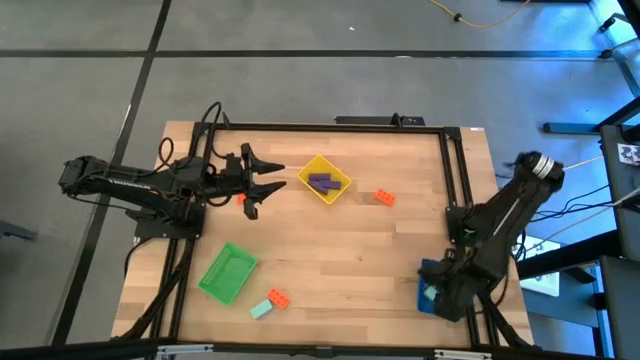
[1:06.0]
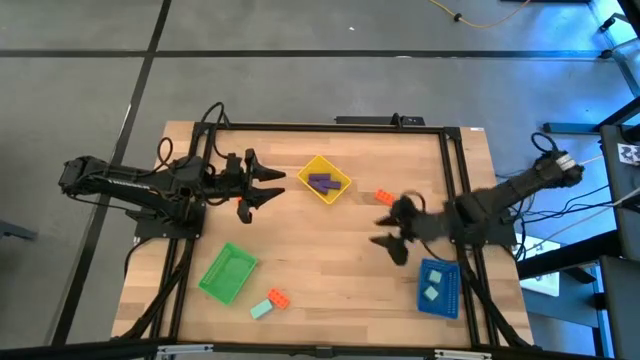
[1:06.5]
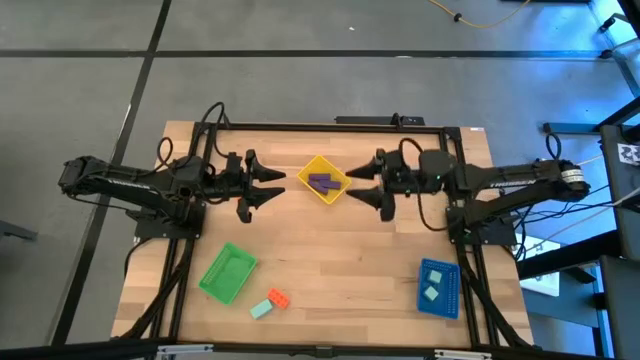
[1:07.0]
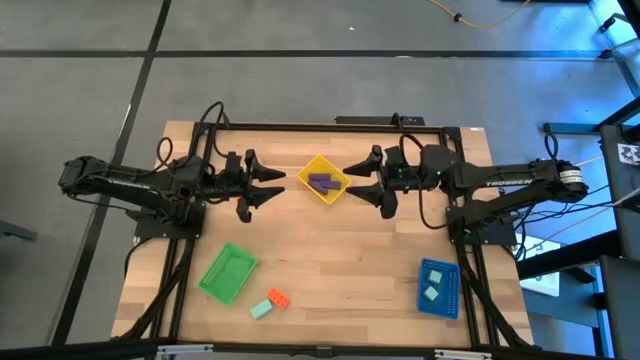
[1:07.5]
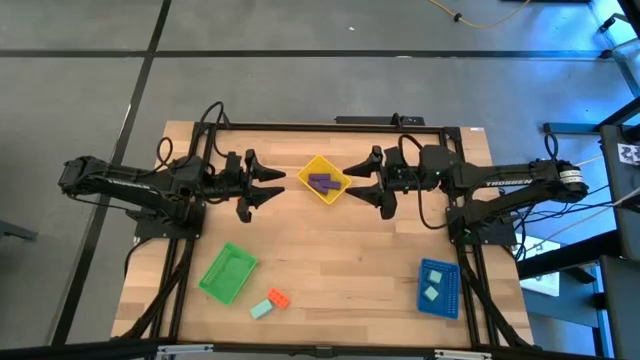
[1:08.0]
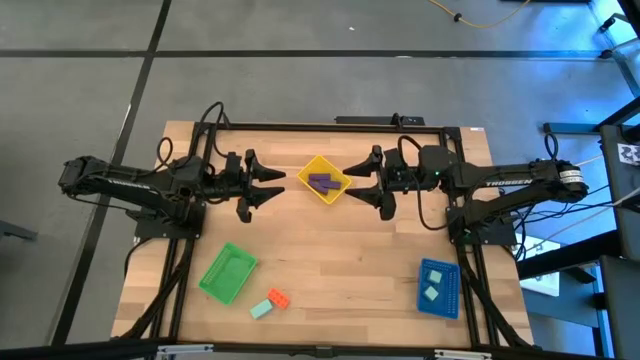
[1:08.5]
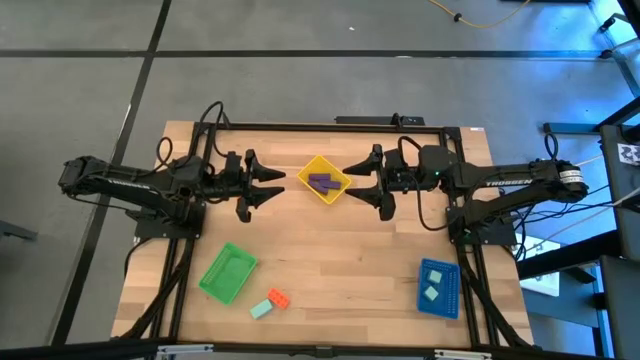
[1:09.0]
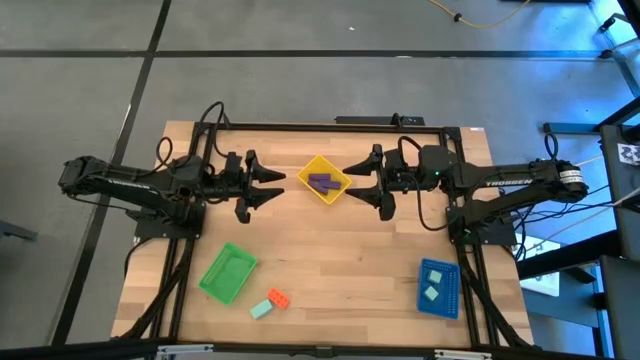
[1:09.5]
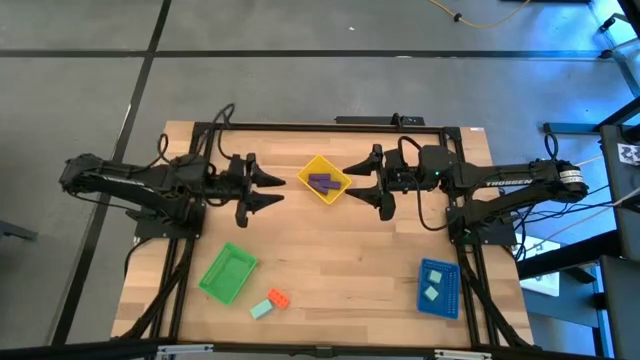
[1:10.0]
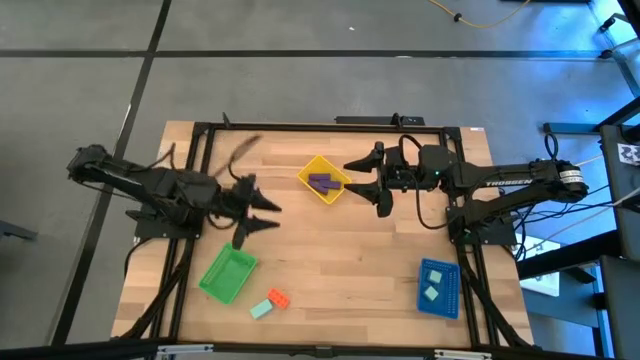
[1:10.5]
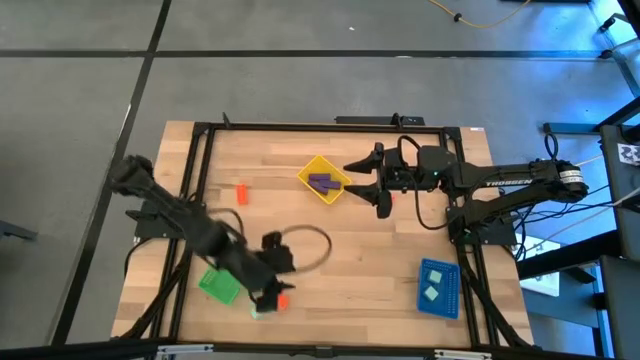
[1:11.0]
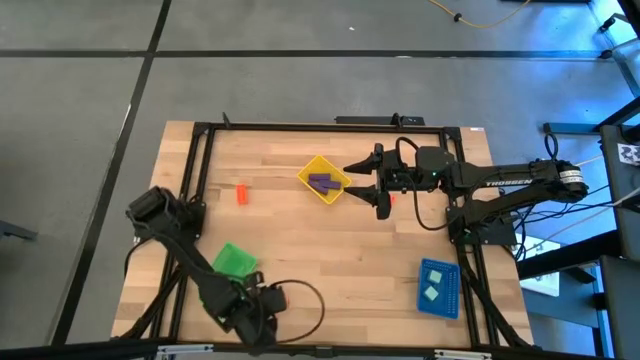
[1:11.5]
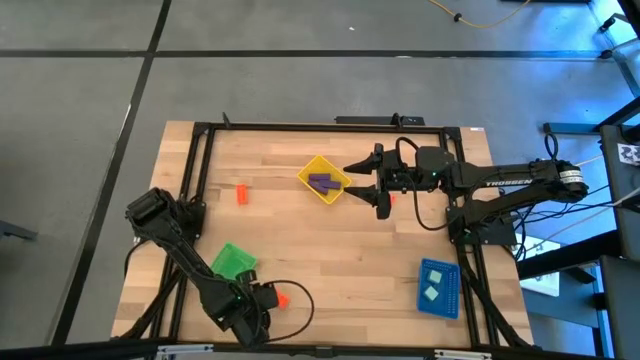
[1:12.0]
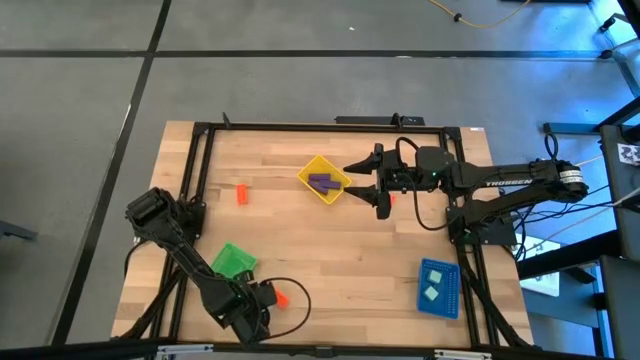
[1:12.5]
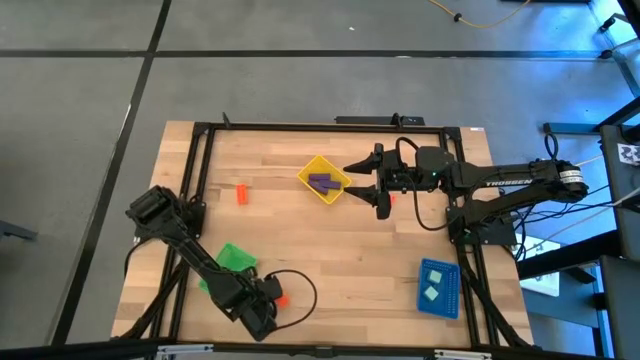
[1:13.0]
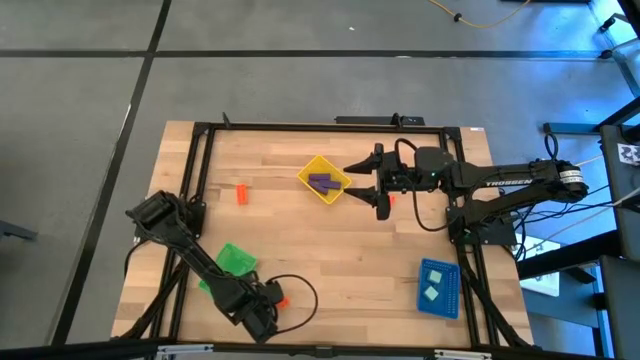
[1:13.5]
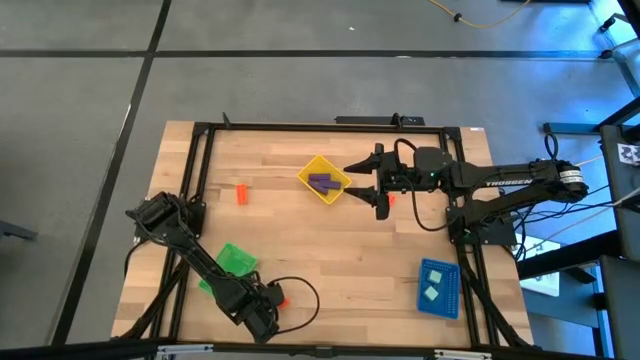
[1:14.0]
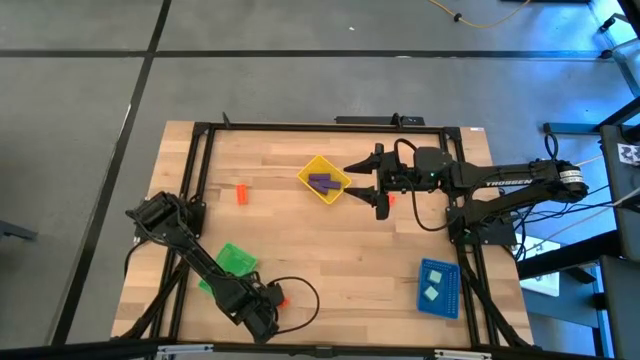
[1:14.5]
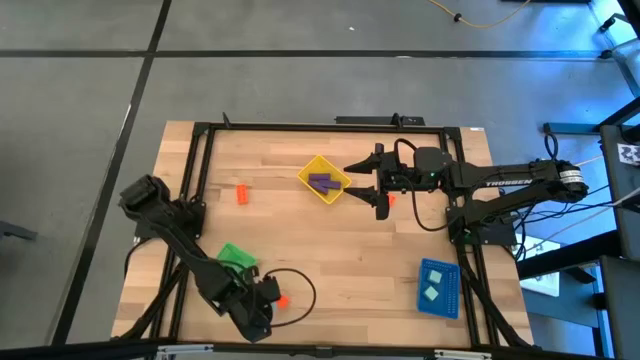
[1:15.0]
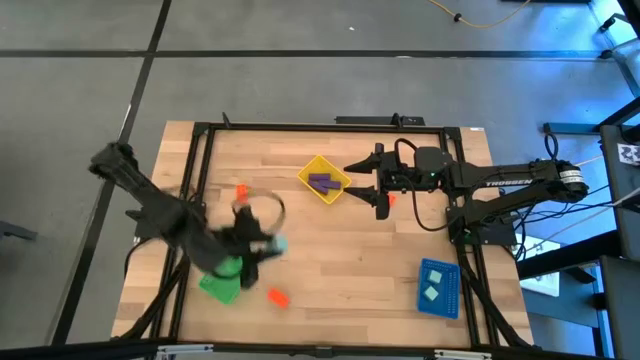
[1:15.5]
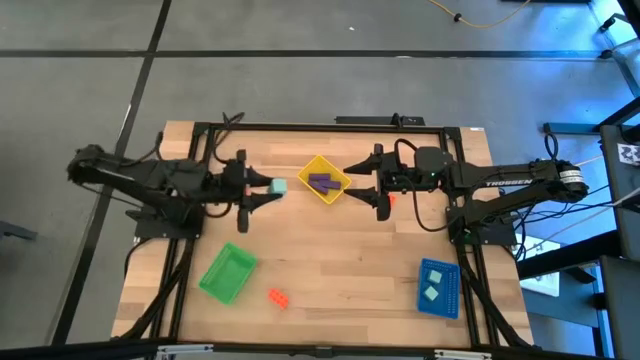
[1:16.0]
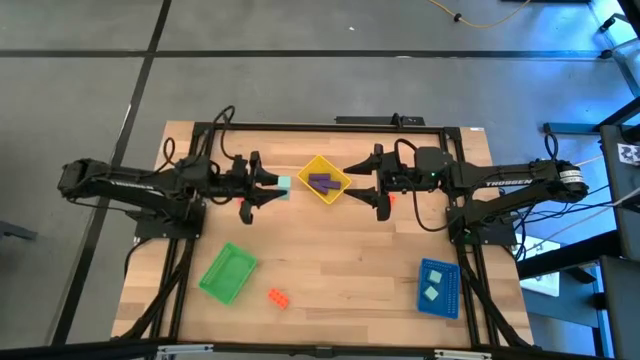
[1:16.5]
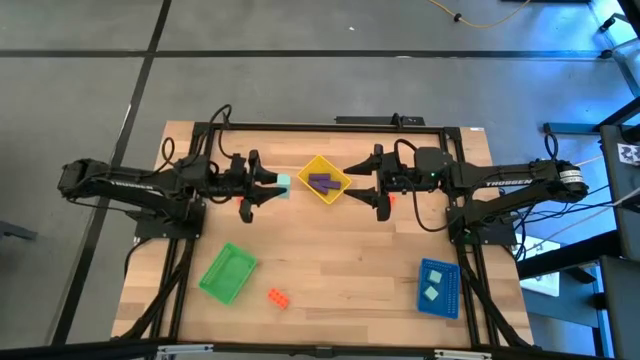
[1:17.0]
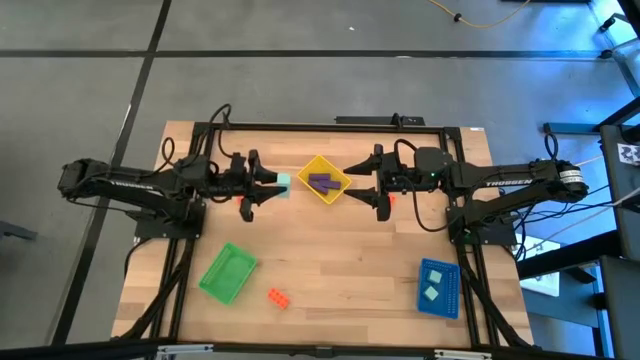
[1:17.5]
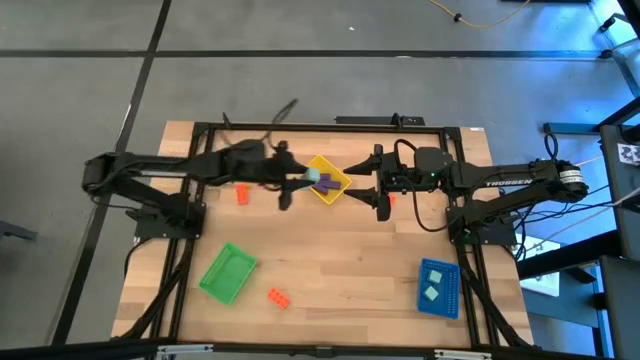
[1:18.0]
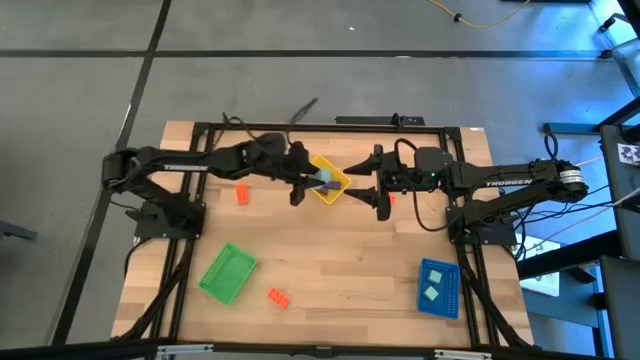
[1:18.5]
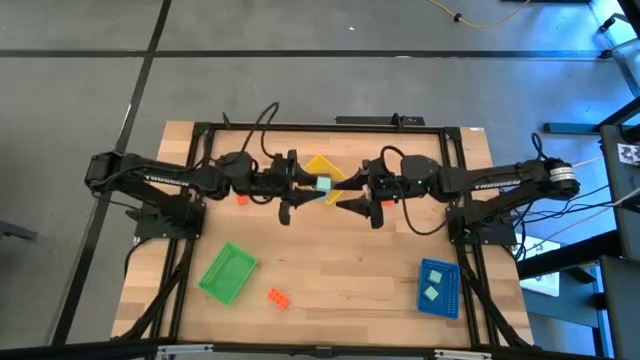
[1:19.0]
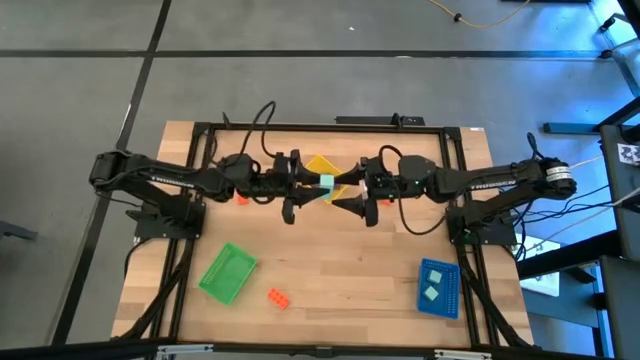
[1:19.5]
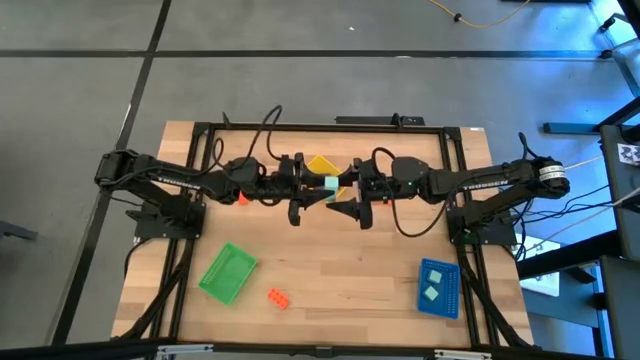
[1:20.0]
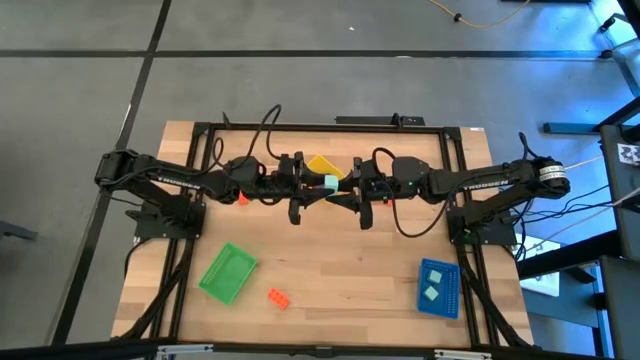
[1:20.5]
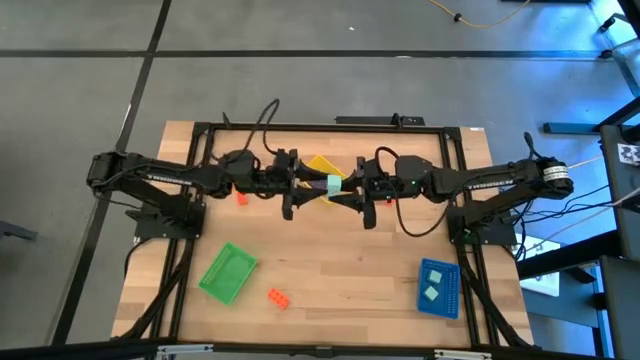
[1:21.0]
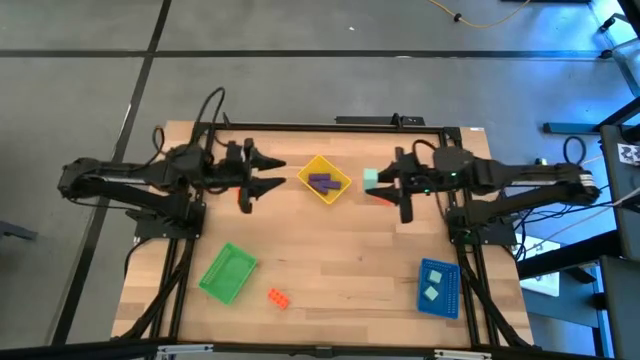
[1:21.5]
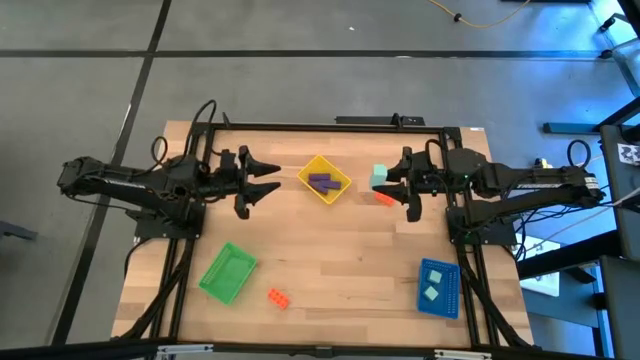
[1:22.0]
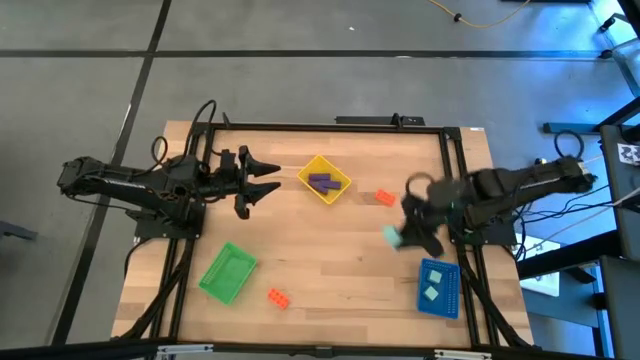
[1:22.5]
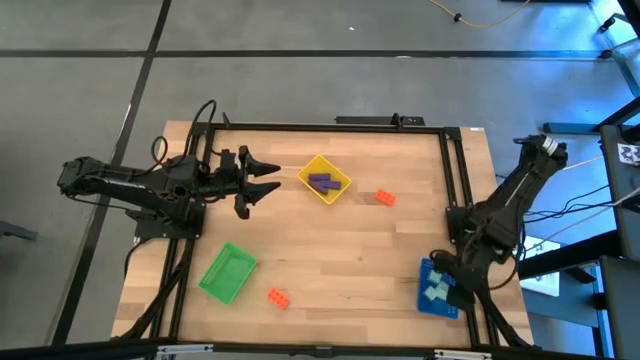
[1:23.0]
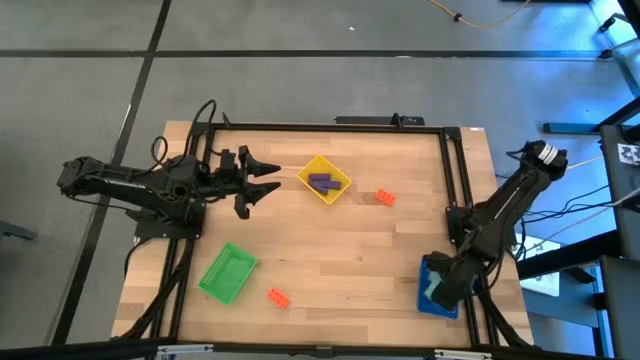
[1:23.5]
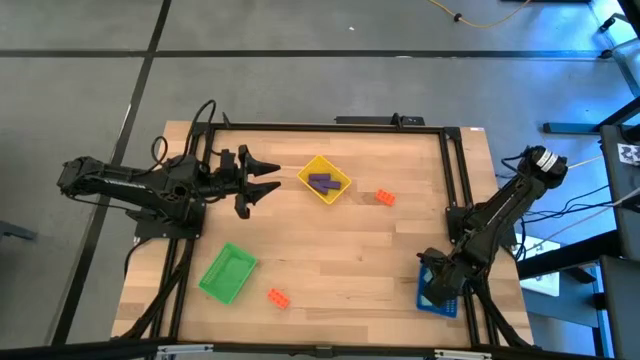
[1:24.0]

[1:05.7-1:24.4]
Task: Sort & place blocks by color
Put the light blue block into the blue bin

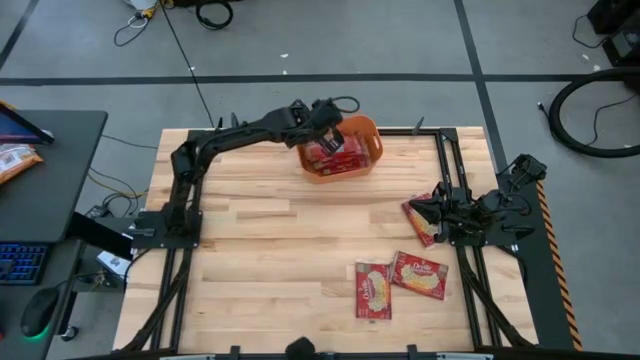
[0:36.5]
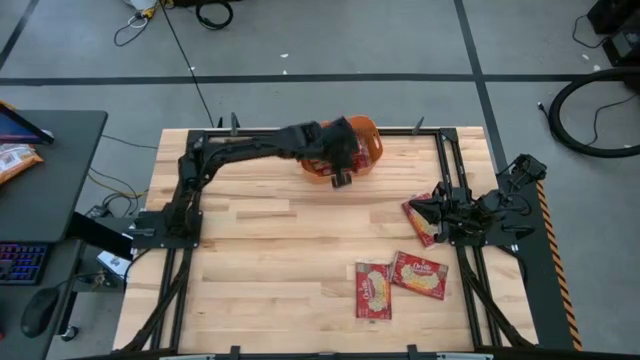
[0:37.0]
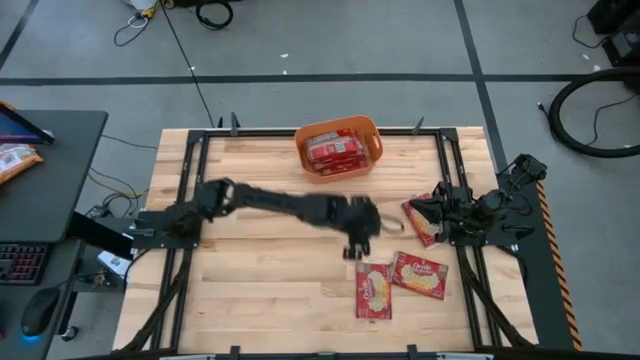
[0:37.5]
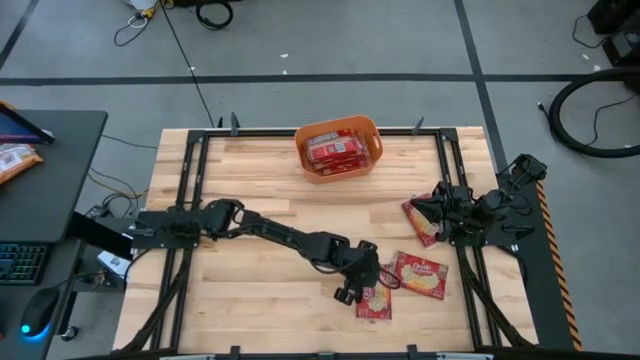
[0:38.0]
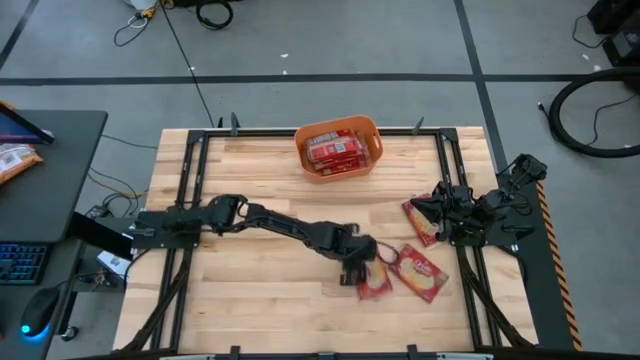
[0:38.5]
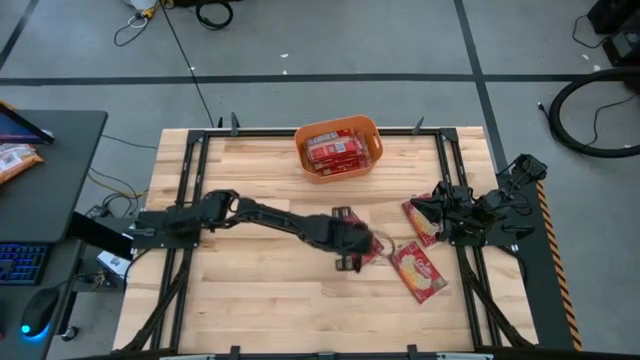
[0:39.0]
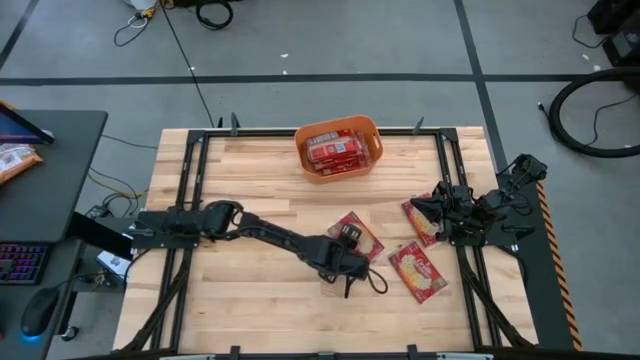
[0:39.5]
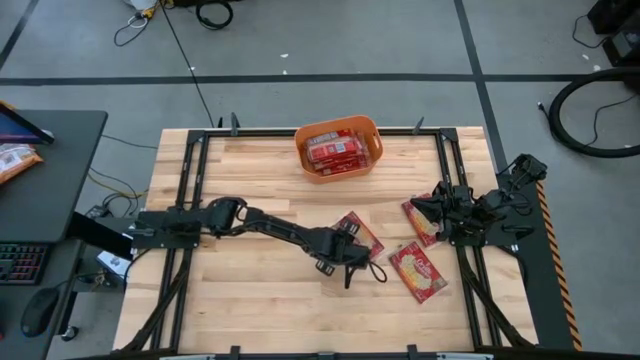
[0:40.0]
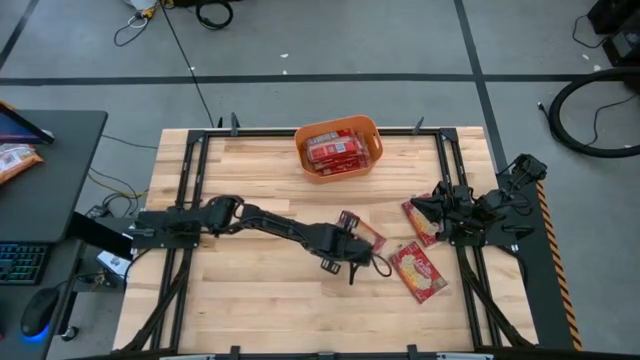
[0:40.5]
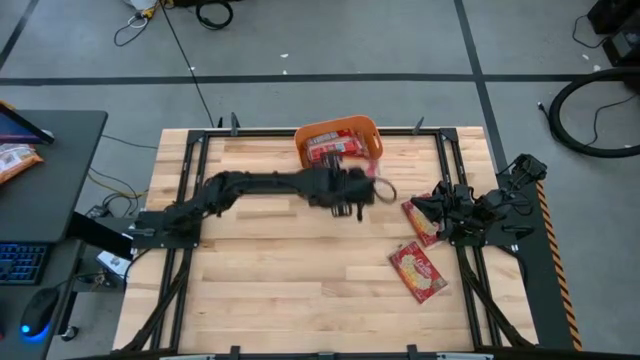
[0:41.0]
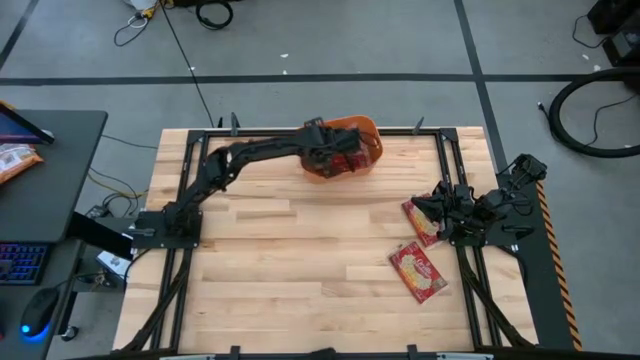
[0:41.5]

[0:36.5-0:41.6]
Task: Sort popcorn bags into baskets
Stack the popcorn bag on top of the stacked popcorn bag into the bin
